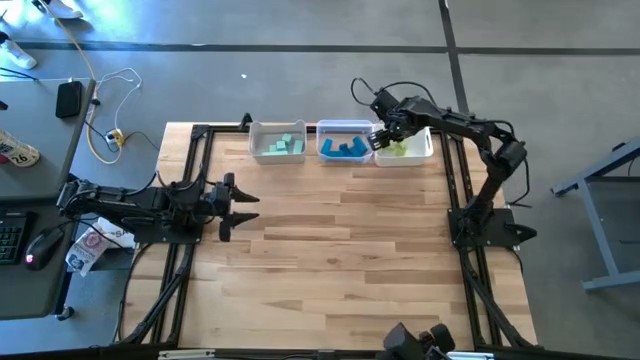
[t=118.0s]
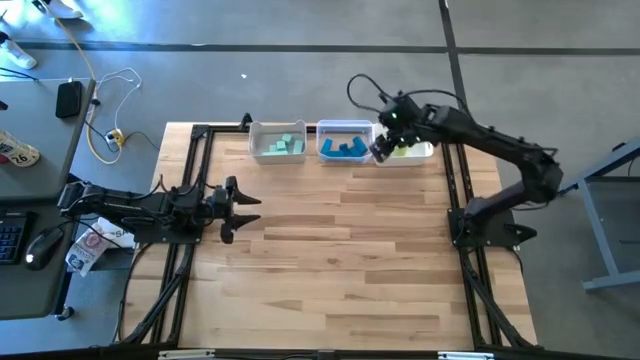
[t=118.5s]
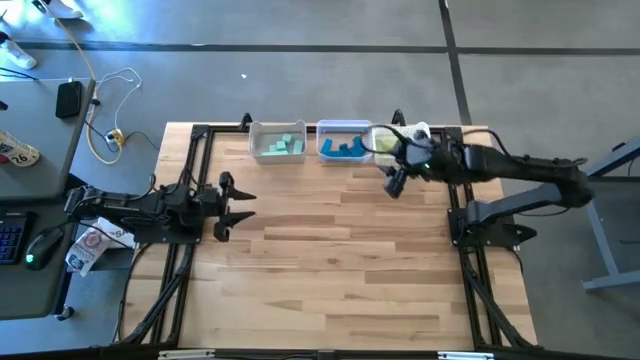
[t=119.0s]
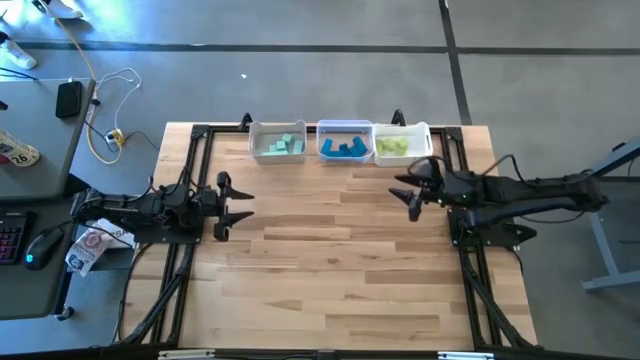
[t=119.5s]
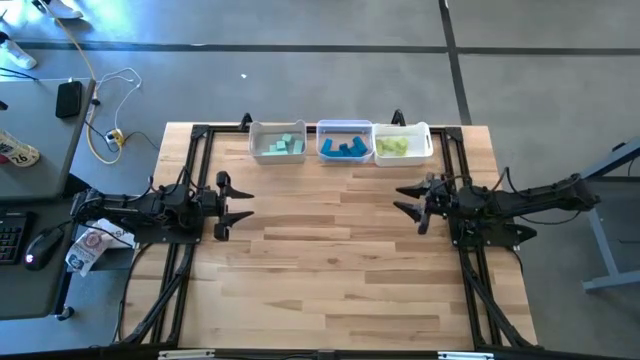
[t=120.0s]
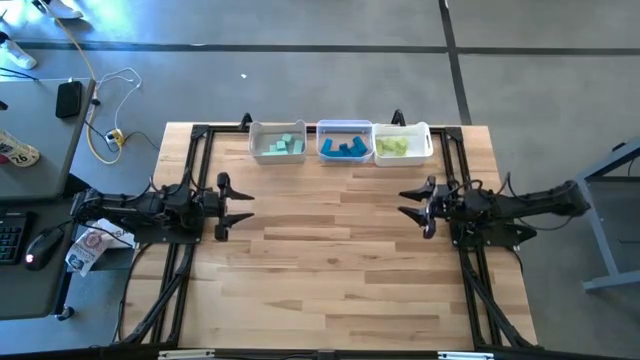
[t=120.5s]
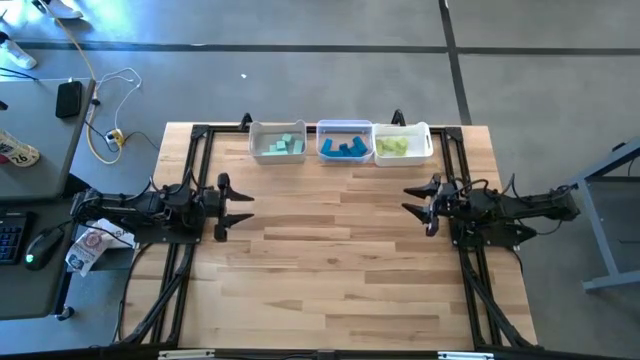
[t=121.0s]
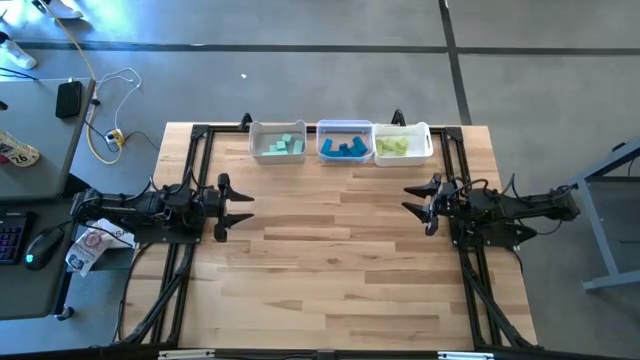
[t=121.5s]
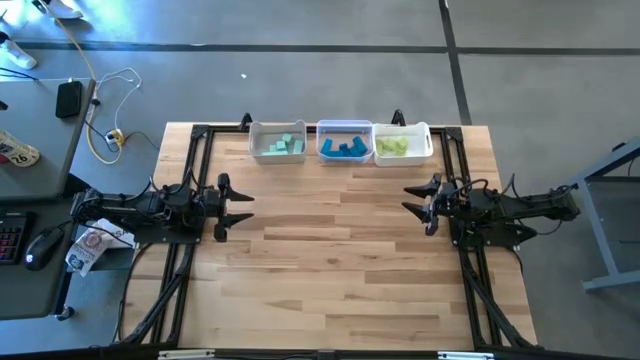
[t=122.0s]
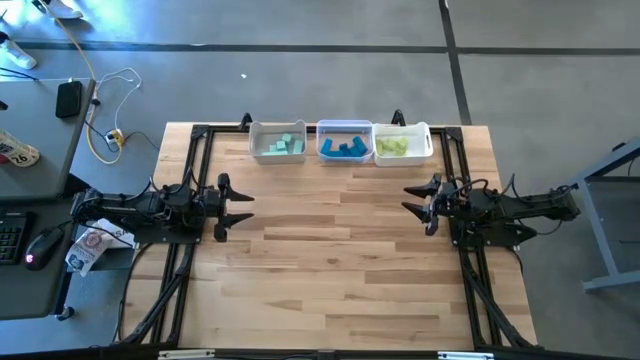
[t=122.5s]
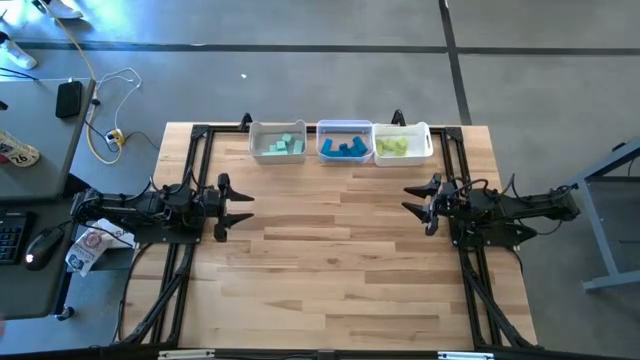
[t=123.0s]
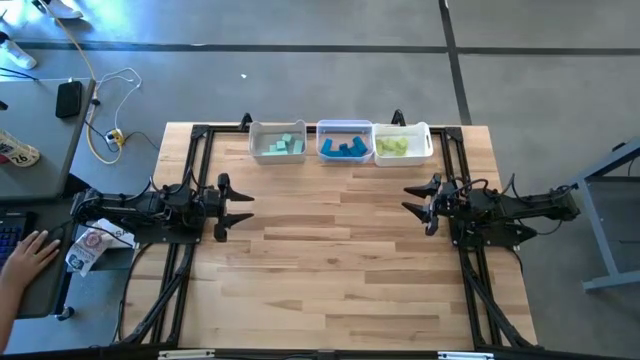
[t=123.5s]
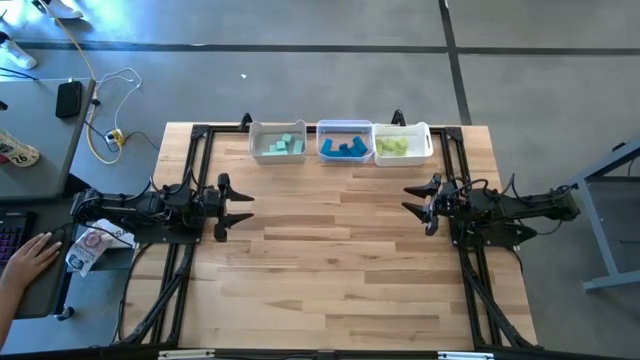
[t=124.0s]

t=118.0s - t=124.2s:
Task: Sort & place blocks by color
Return to Home Position

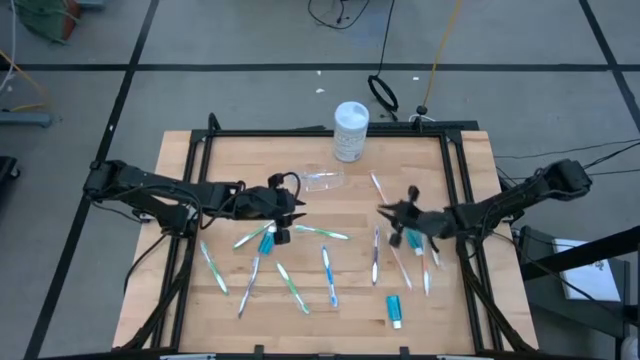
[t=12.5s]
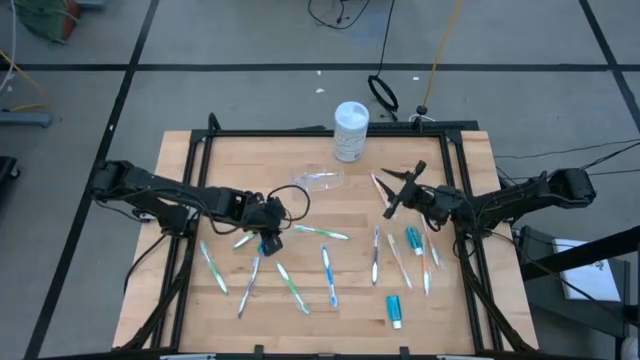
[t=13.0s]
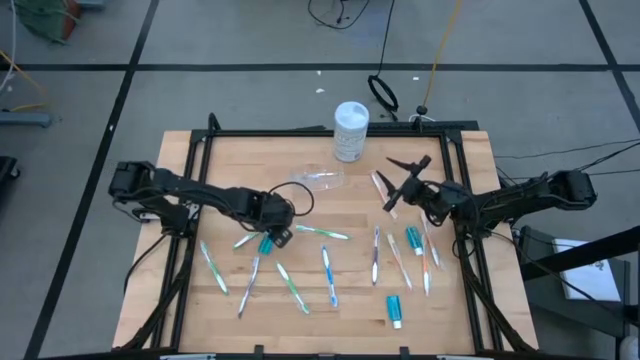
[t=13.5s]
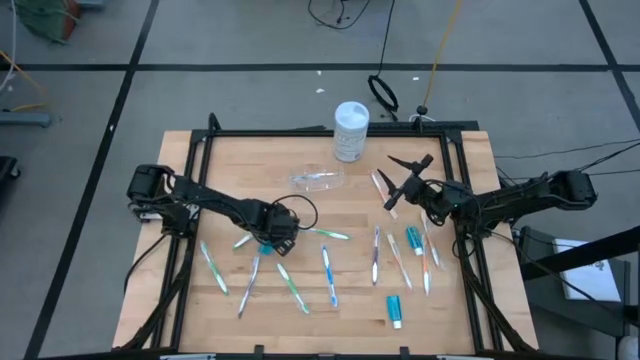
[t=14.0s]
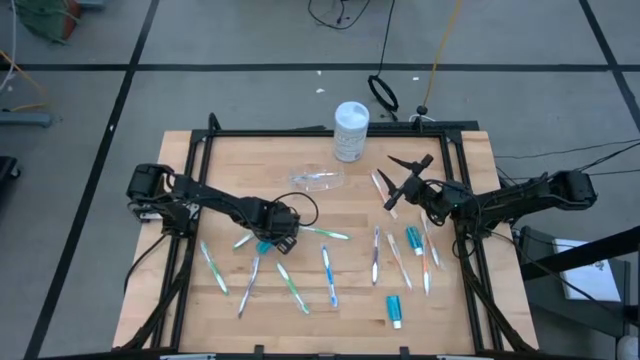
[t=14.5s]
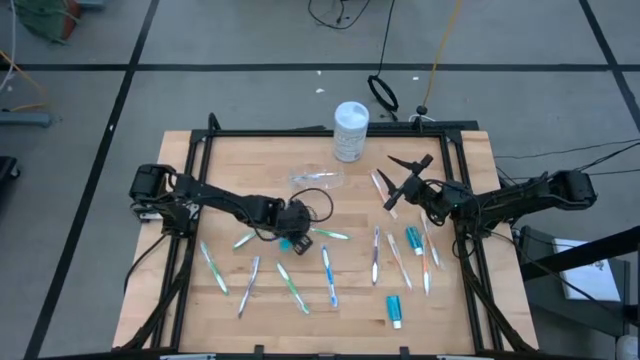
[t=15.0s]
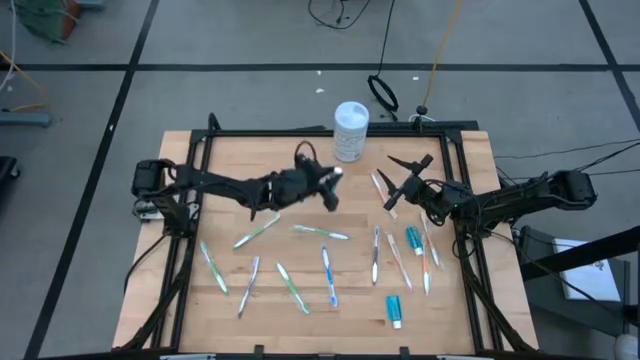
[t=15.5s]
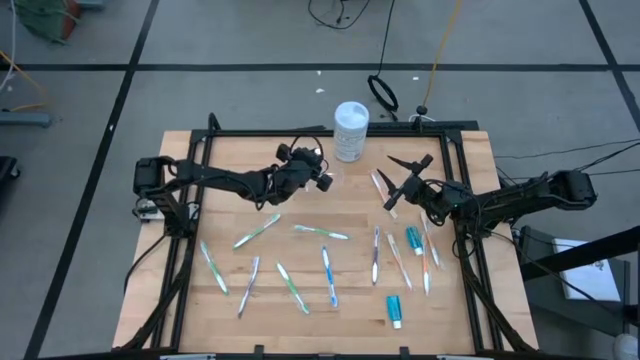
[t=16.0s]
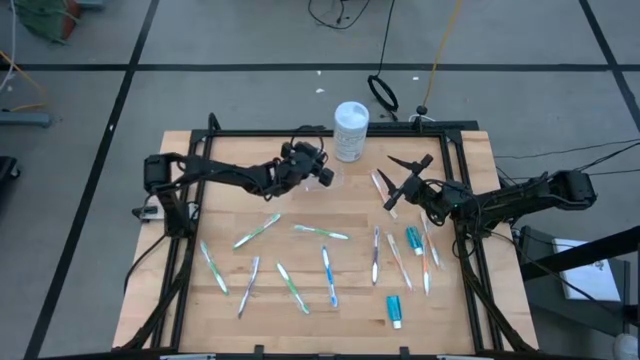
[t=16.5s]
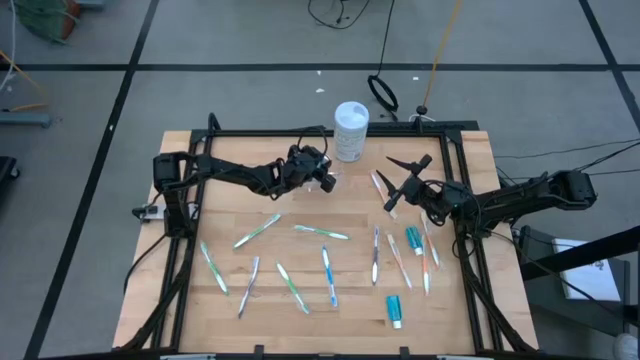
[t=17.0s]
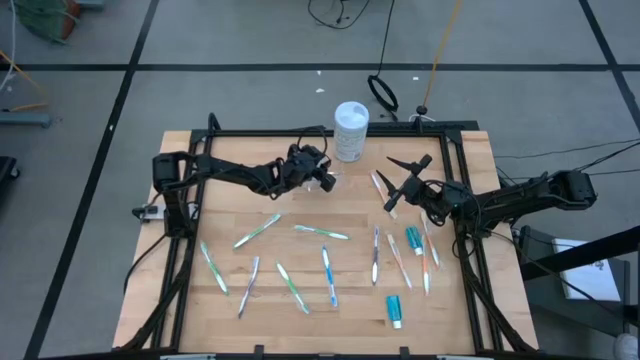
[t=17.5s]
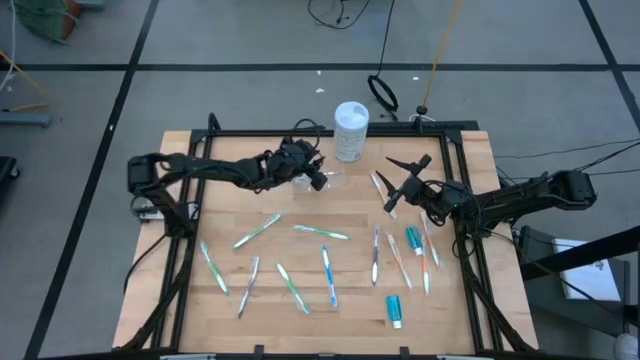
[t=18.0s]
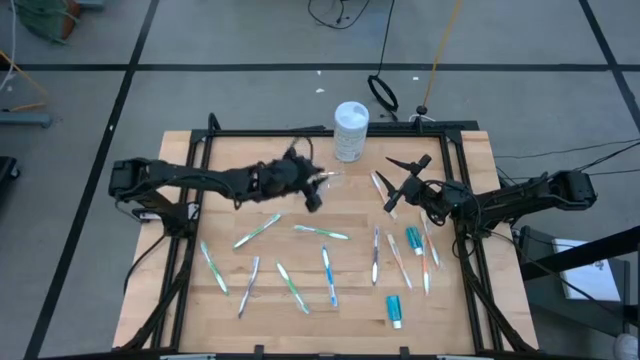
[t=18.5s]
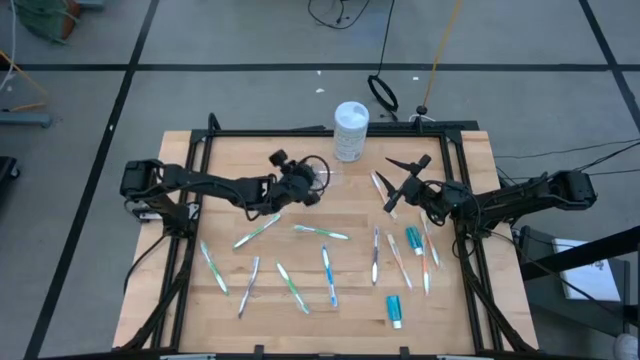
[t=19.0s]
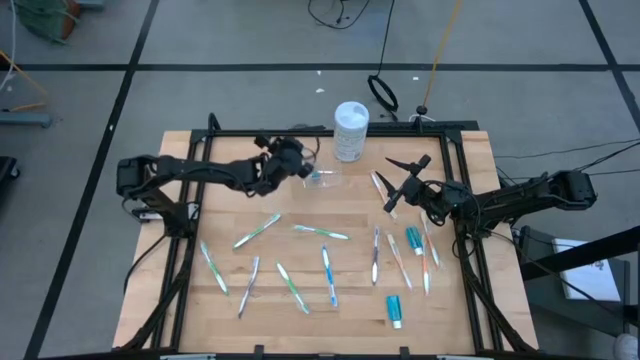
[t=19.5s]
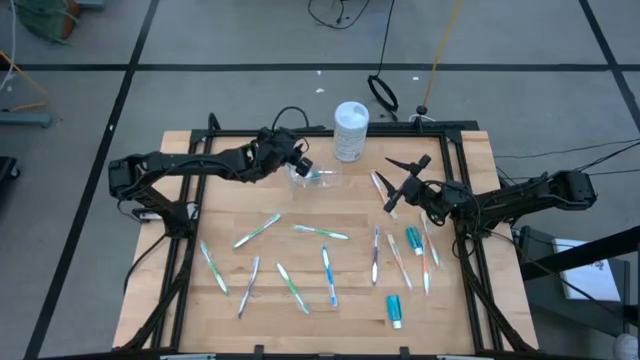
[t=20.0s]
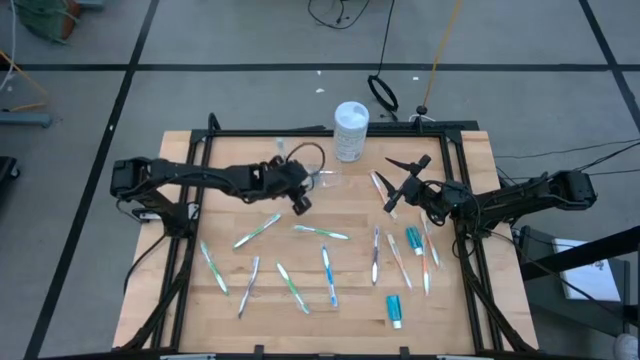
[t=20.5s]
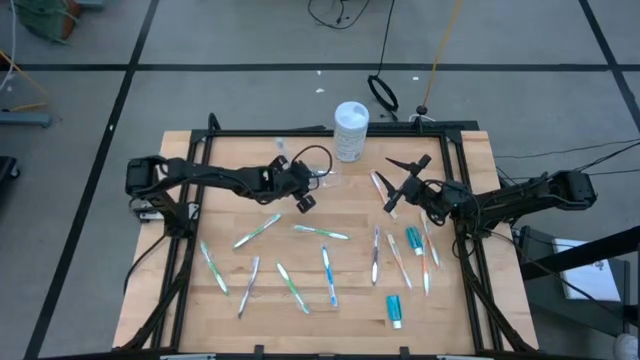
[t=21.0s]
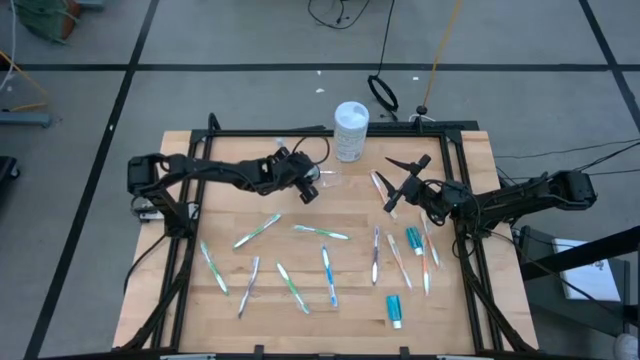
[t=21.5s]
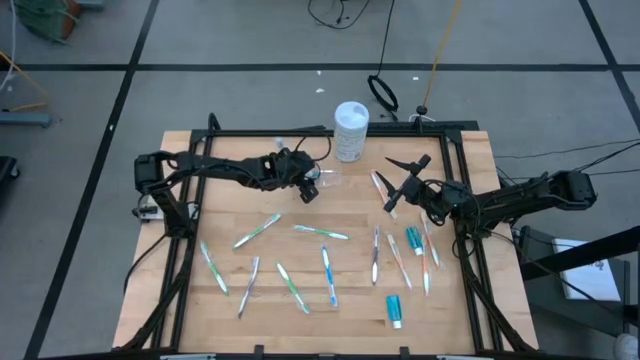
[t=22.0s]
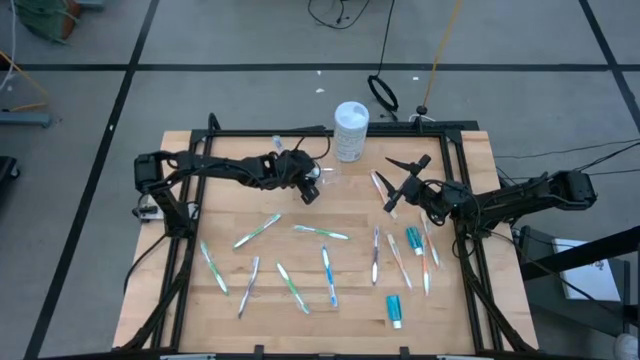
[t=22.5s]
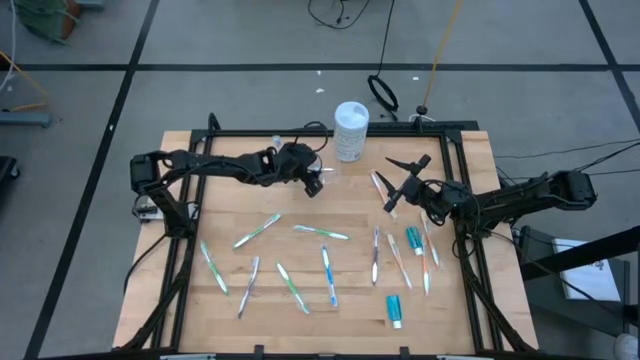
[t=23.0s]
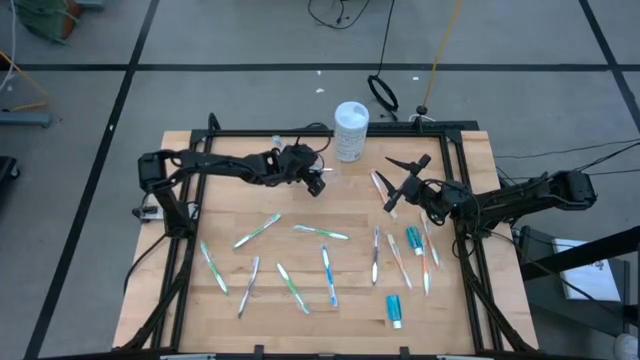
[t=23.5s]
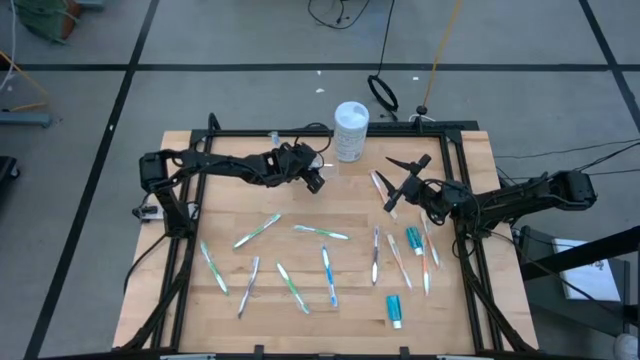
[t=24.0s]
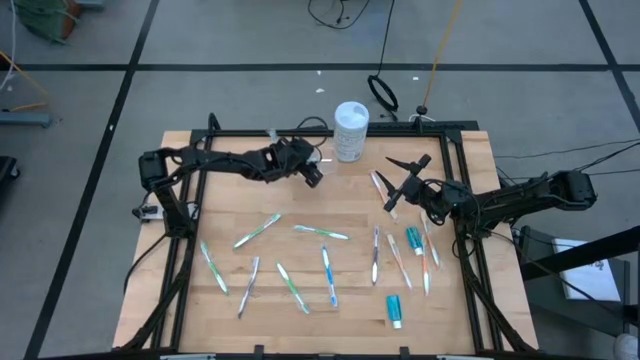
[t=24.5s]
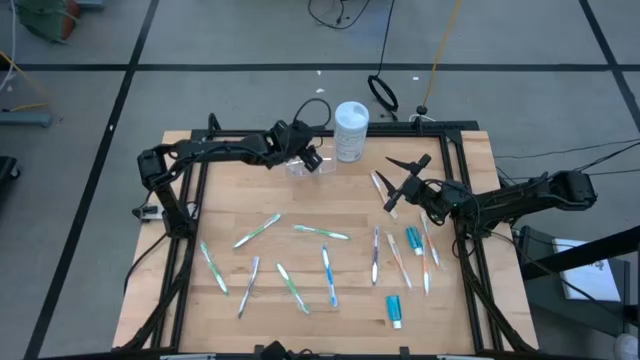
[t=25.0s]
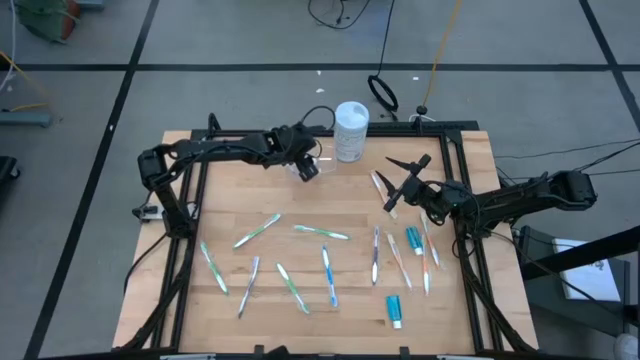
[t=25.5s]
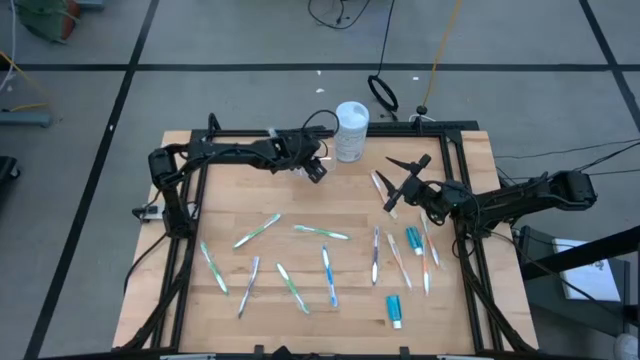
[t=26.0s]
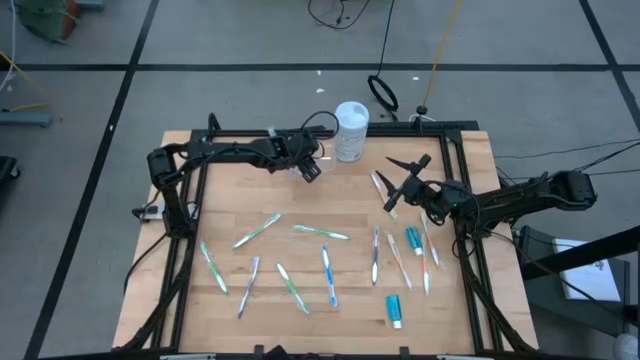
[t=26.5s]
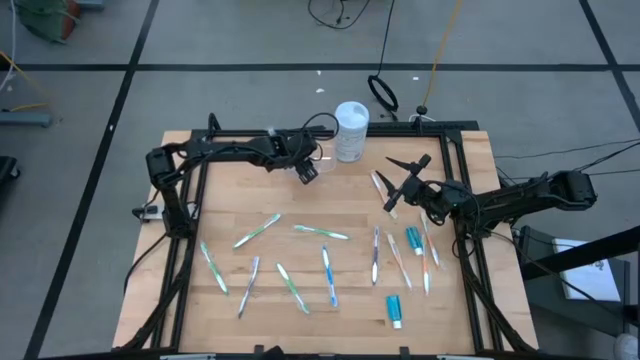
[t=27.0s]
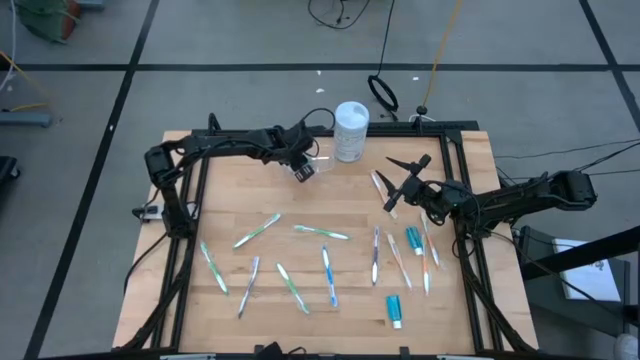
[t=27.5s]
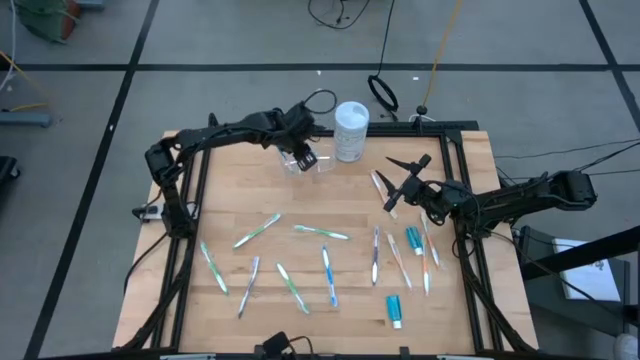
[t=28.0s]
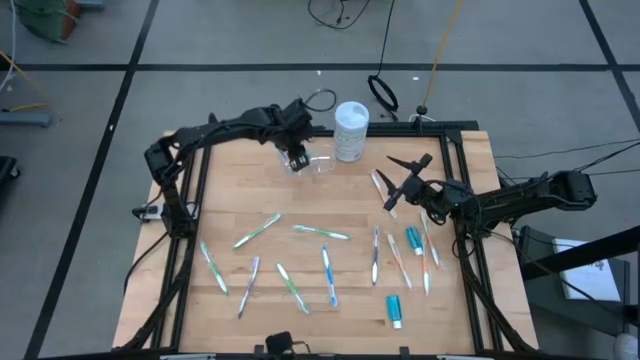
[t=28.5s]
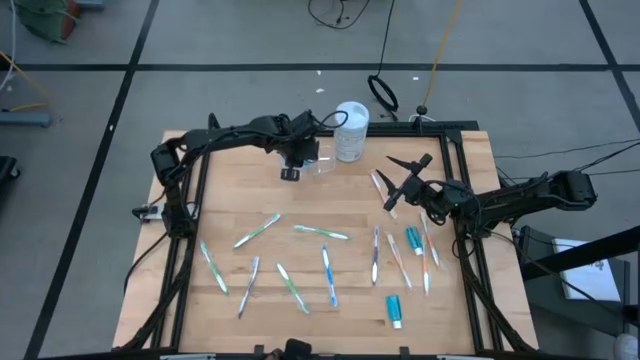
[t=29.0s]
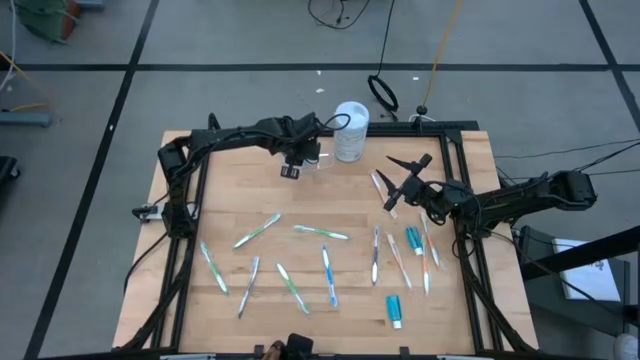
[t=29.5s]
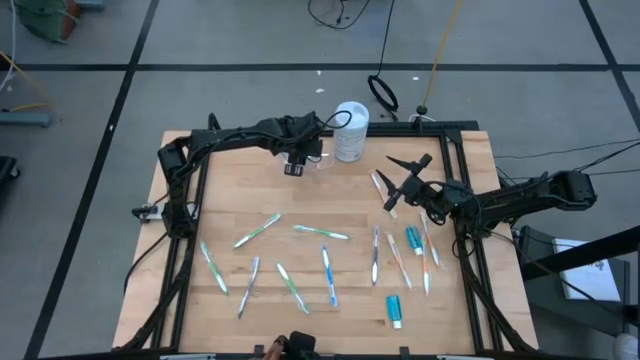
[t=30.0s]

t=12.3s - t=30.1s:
Task: Pick & Place toothbrushing station
Put the blue mouthwash into the transparent organizer
